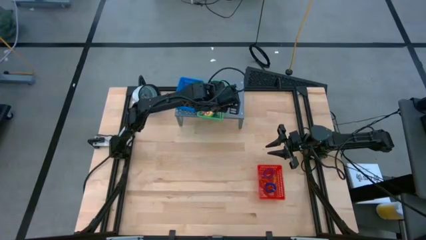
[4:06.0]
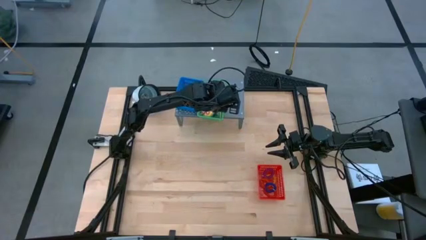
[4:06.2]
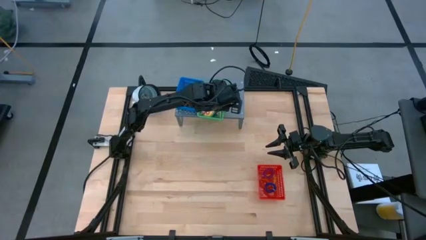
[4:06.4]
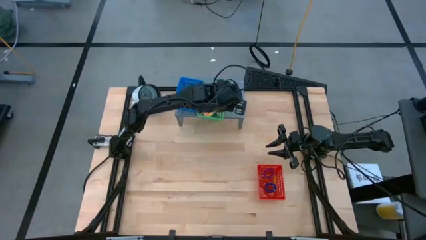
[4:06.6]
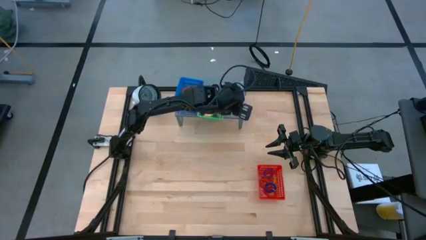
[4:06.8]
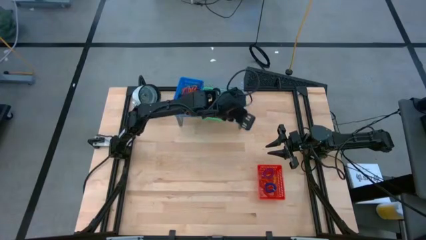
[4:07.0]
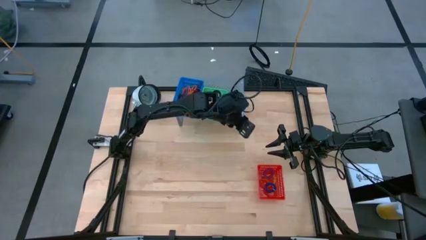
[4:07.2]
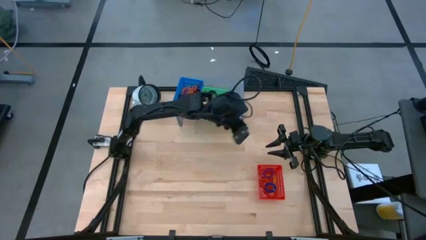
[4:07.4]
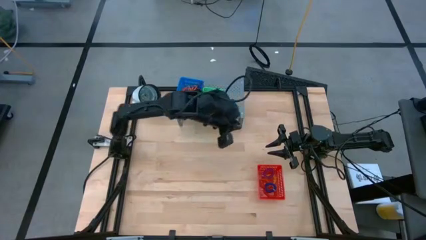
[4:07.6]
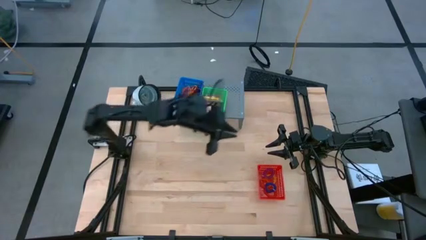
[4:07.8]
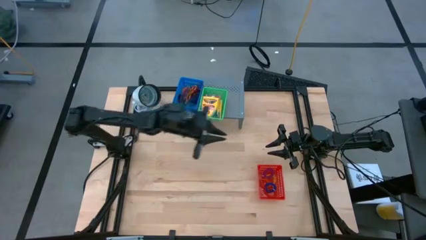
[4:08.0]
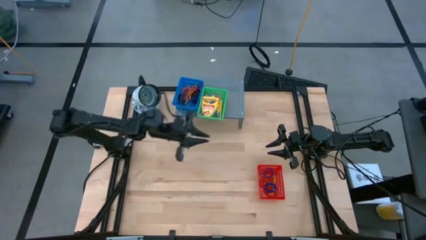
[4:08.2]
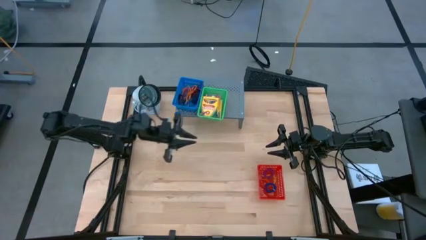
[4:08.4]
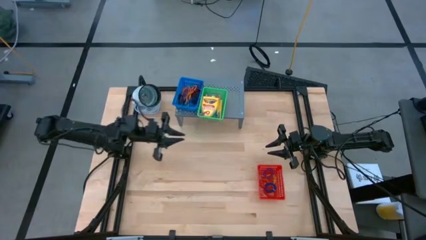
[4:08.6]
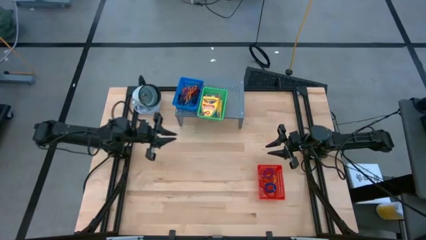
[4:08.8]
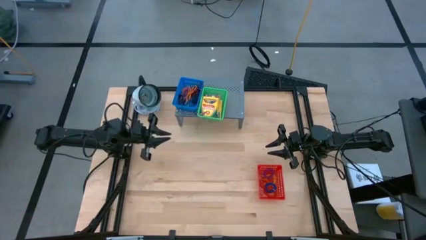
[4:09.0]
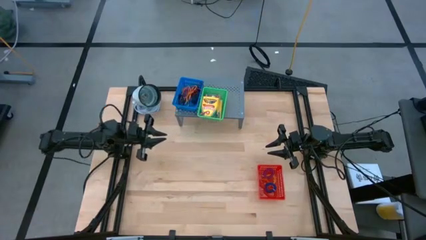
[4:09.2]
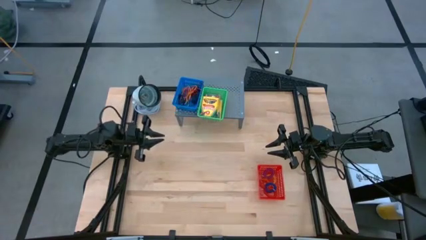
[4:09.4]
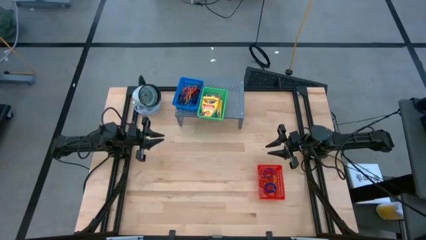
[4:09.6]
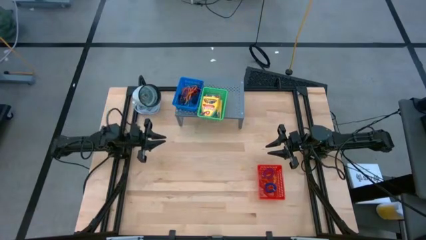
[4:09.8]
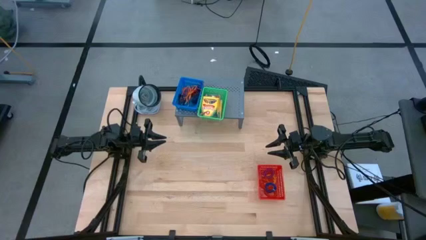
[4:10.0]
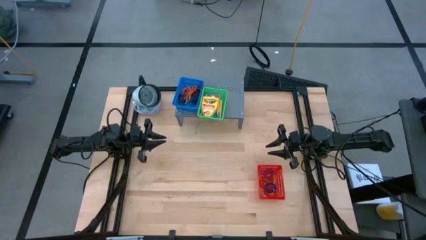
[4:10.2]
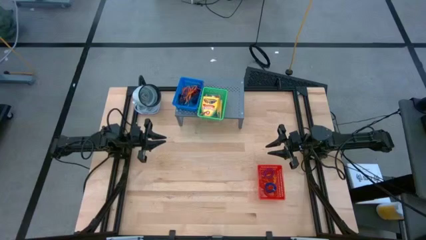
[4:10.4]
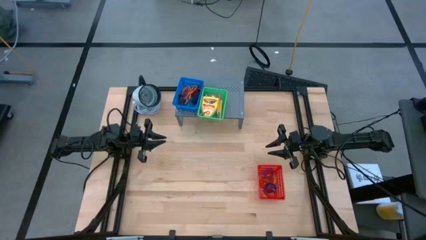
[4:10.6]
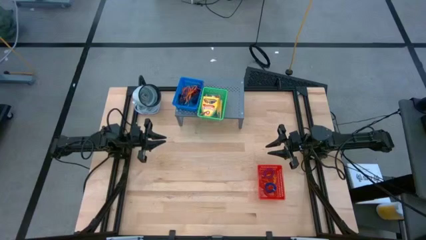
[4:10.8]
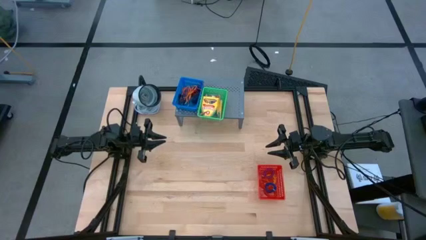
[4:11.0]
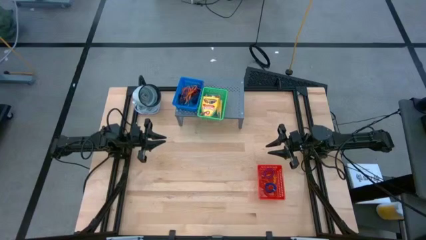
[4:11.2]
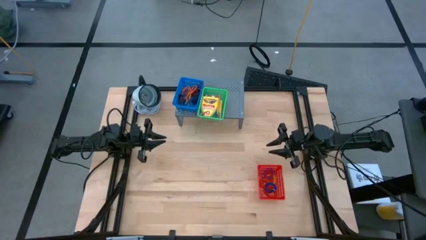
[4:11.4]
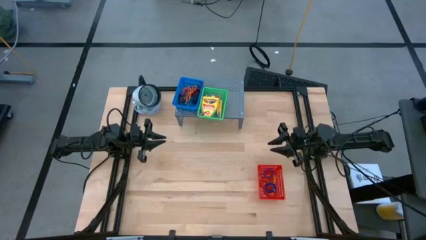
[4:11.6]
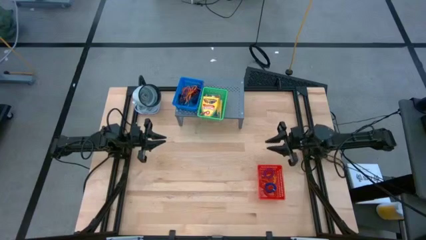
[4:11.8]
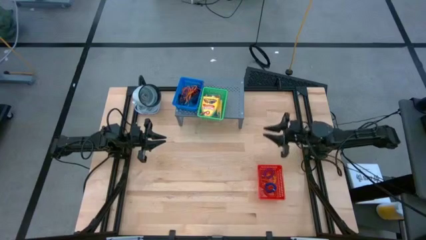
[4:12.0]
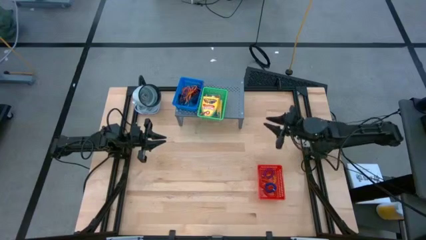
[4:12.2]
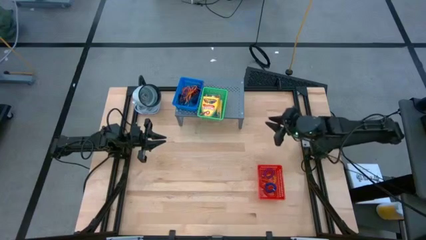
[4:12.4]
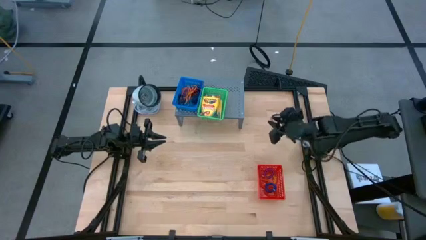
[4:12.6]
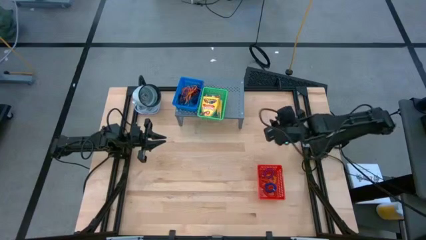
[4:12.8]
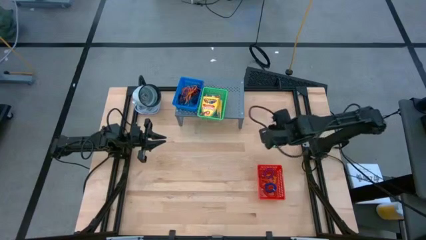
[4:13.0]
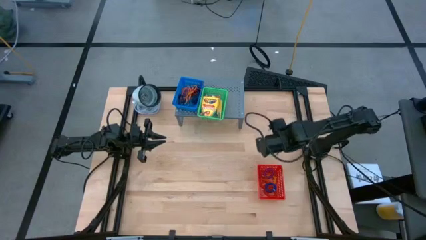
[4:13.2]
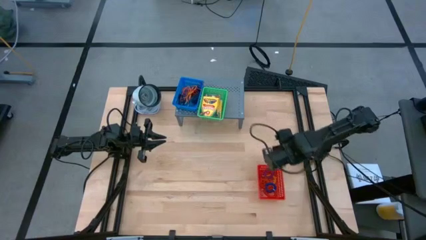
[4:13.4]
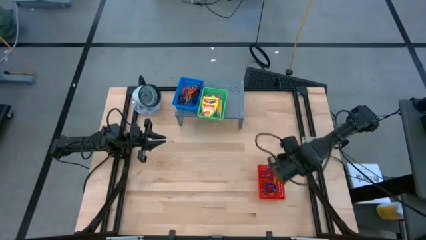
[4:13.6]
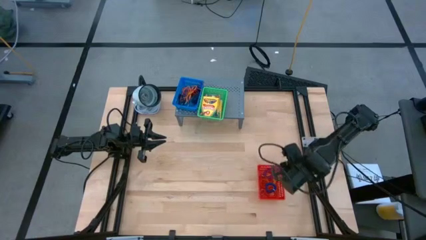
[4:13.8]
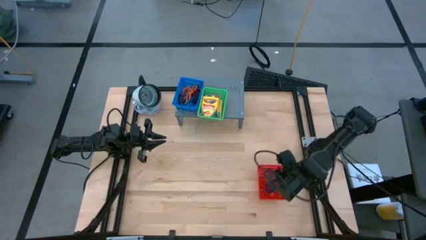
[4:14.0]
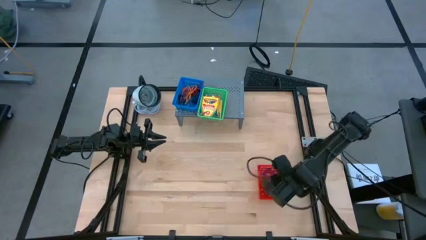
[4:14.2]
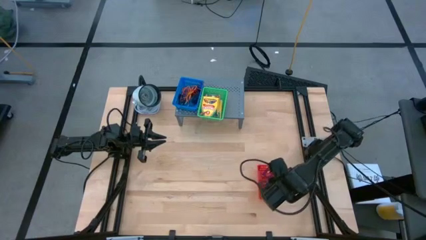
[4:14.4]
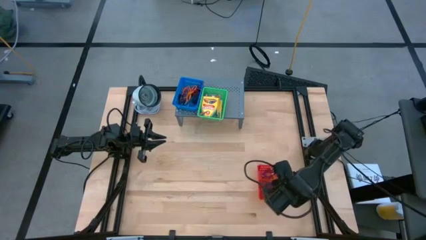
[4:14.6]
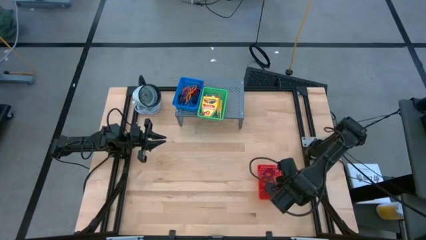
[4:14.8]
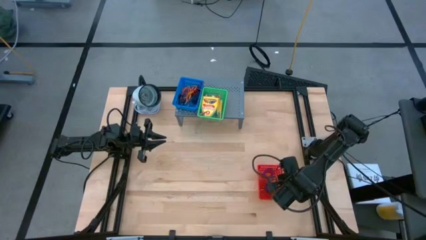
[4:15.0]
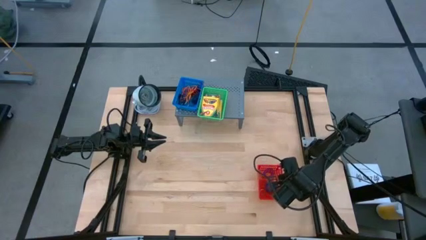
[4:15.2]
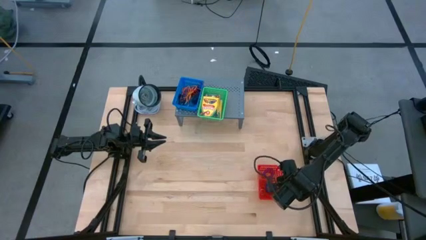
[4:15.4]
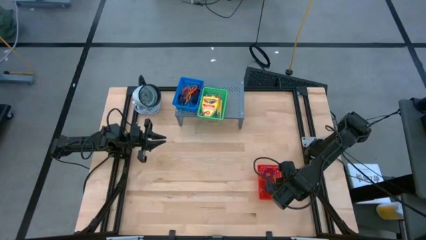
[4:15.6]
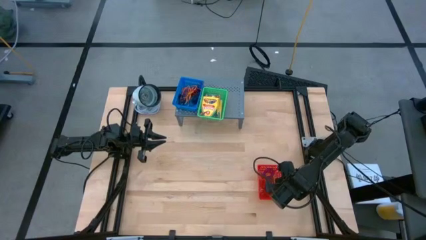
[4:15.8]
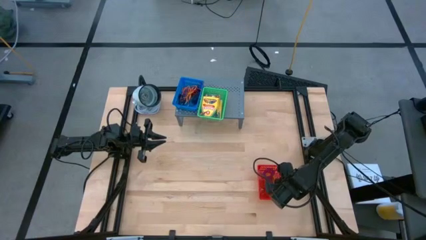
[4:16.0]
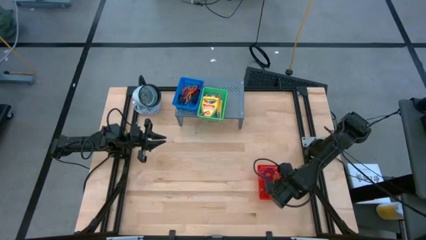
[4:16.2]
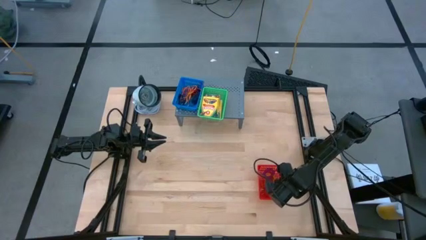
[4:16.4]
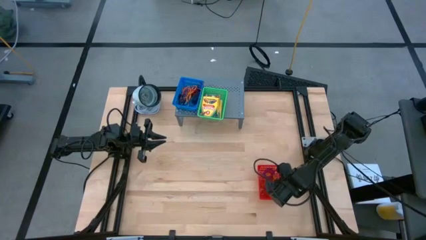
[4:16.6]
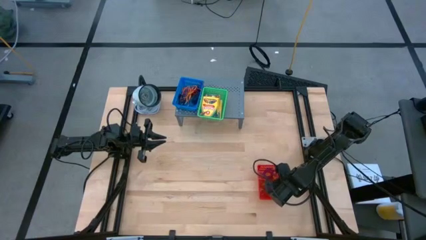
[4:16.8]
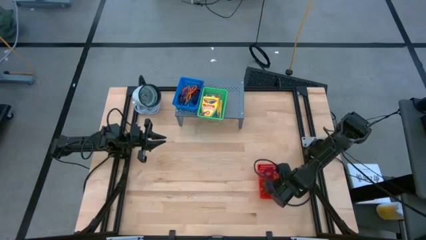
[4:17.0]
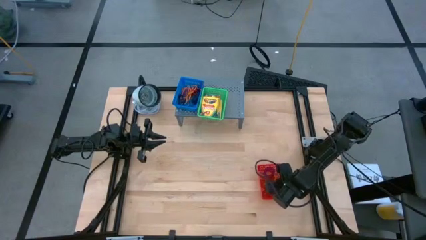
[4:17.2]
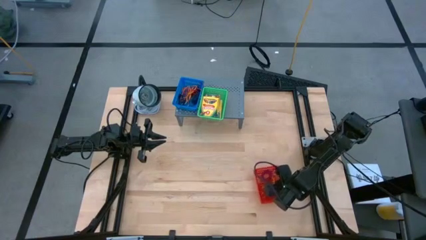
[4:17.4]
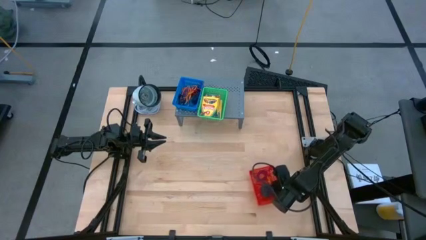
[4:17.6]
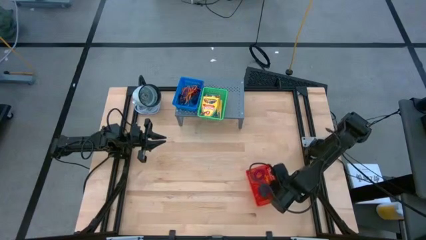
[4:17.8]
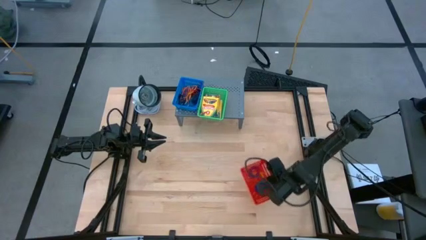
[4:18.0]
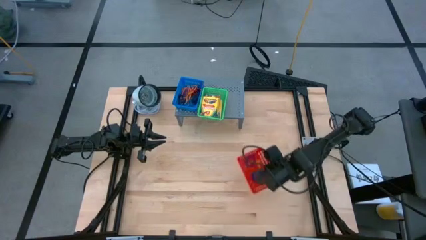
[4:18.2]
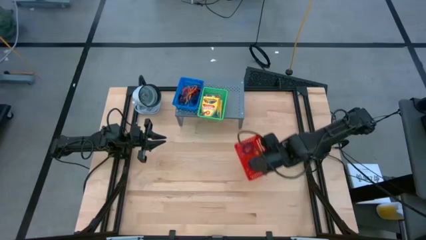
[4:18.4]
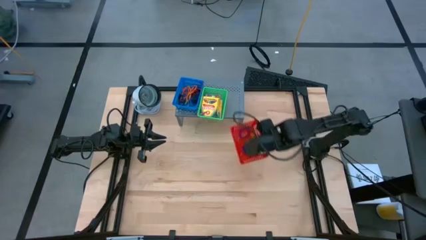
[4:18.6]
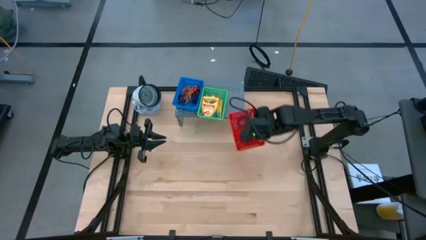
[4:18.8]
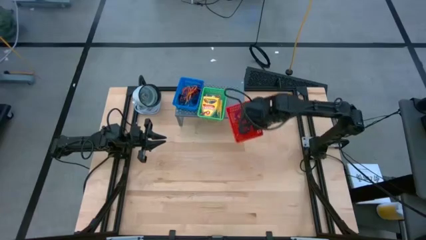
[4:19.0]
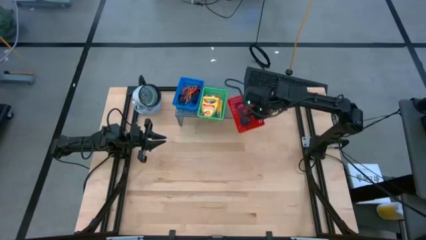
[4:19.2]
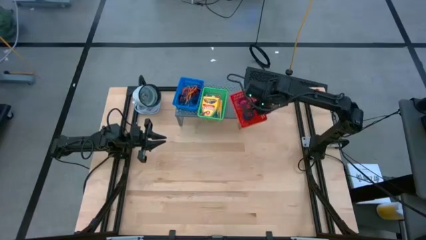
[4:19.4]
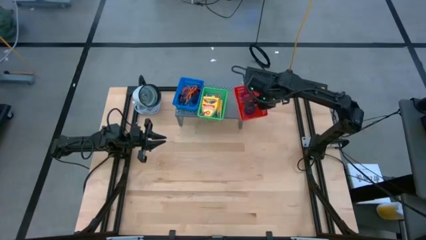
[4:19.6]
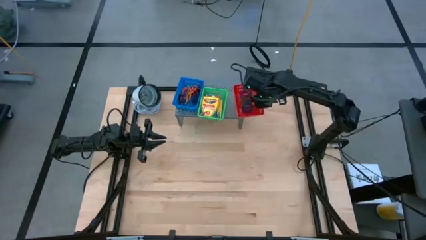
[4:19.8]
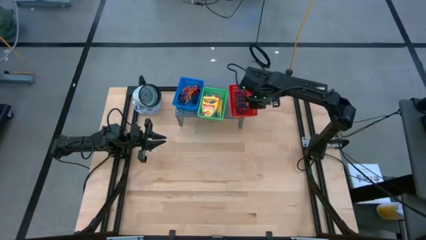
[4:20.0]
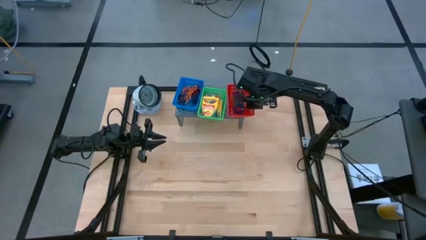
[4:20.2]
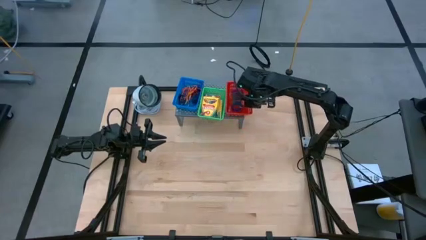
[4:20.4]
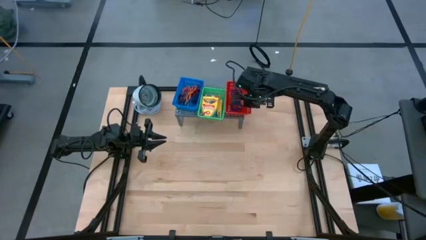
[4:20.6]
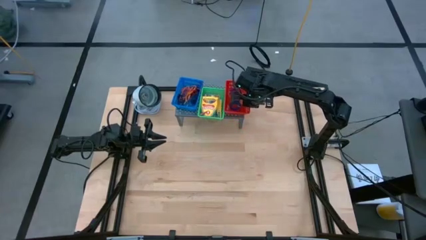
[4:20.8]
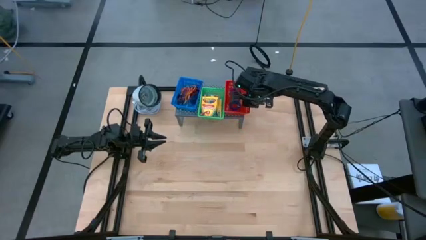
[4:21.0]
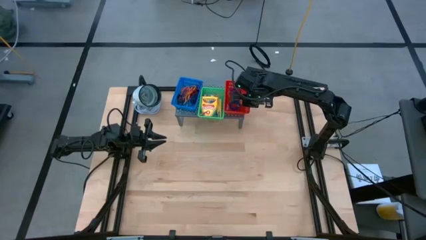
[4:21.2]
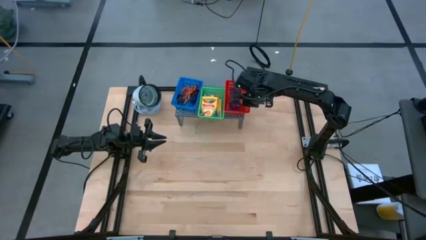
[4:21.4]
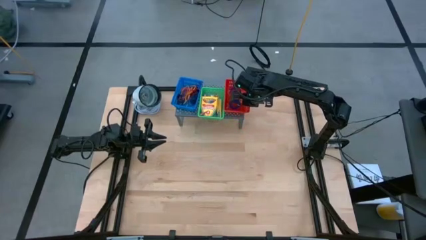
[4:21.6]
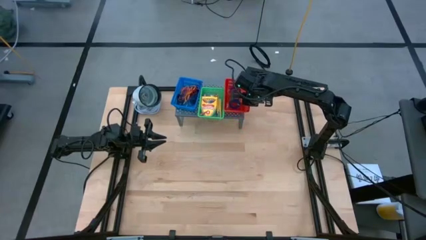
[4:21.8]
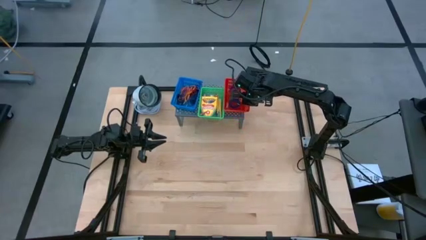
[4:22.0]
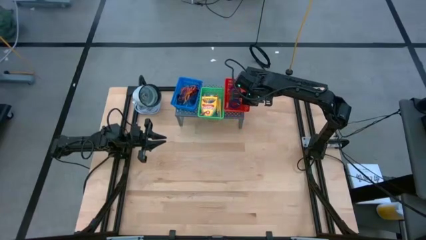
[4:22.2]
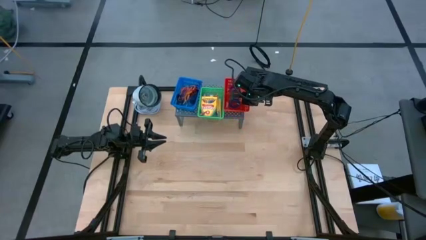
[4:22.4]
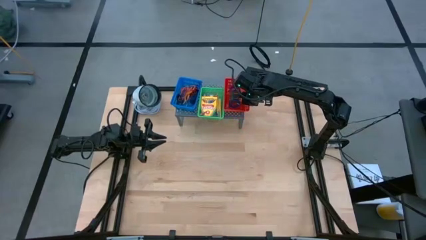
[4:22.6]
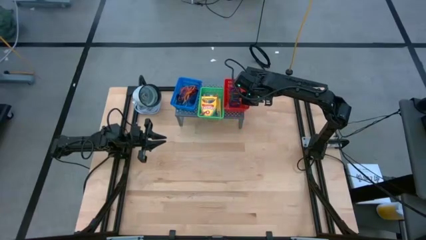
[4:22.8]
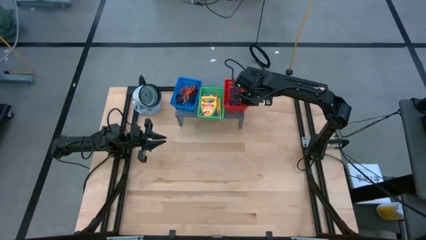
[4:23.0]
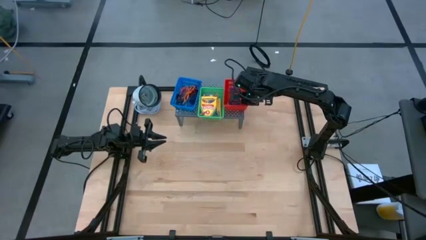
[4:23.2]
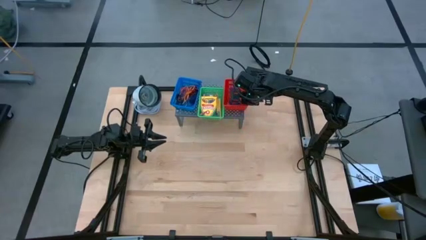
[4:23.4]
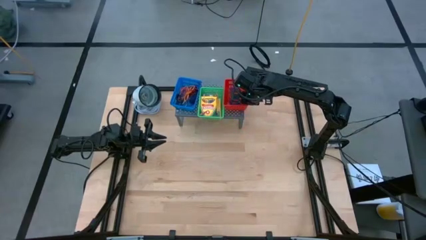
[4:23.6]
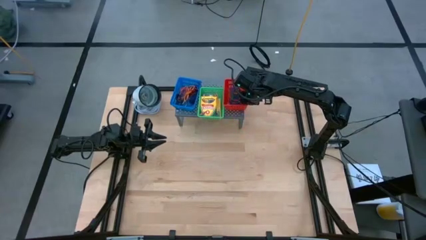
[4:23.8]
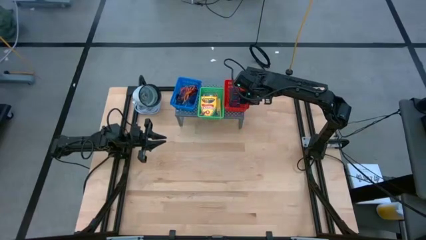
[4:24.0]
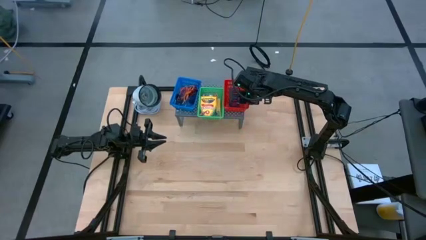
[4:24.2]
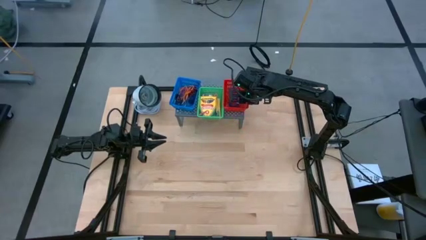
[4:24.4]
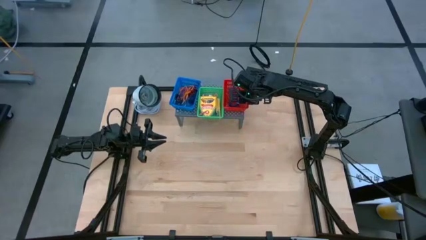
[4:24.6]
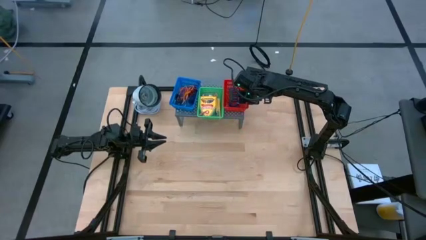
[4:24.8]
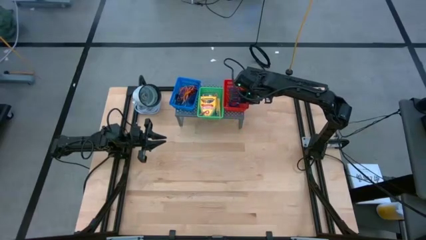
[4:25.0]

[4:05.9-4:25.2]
Task: Pick & Place Office Desk Supplies
Put the red bin on the shelf
